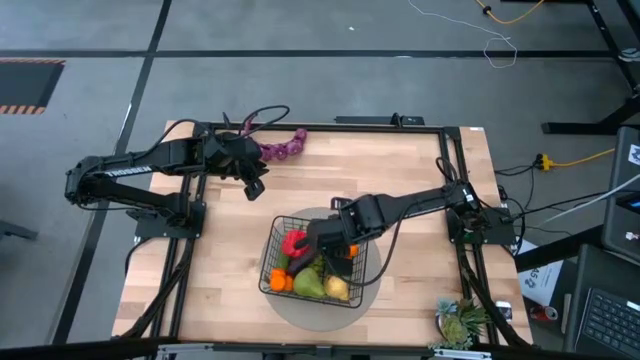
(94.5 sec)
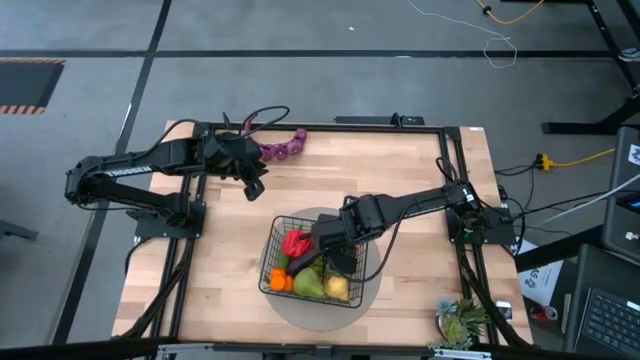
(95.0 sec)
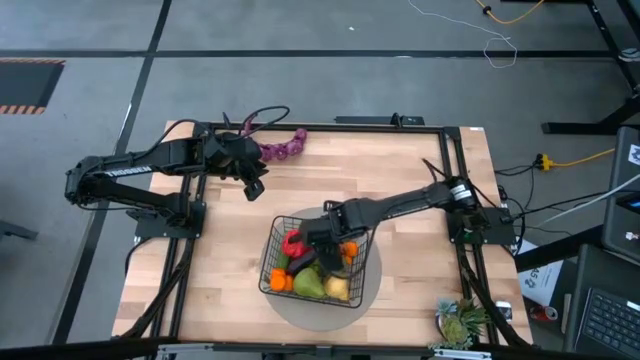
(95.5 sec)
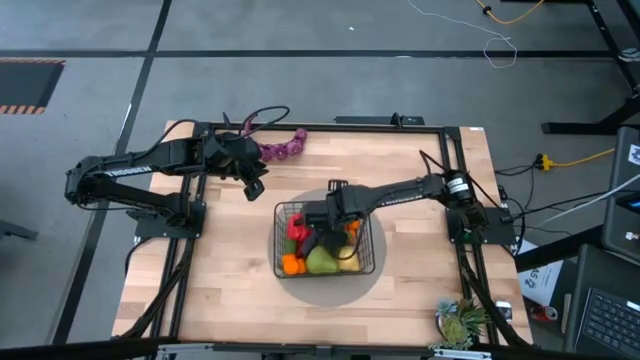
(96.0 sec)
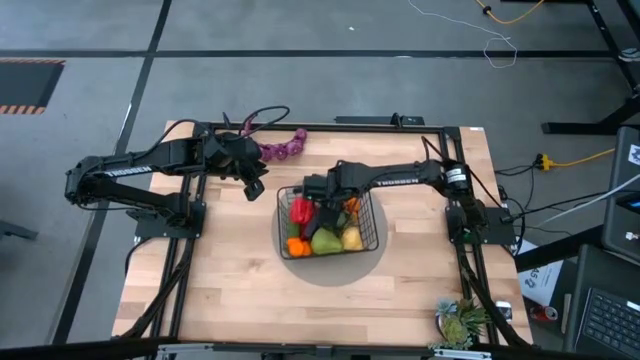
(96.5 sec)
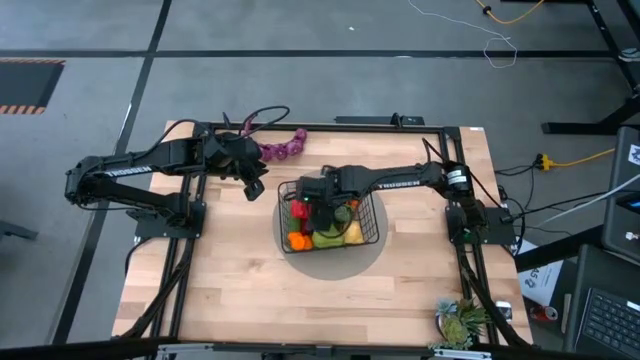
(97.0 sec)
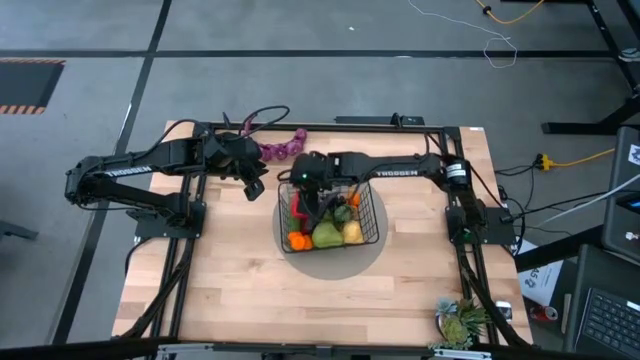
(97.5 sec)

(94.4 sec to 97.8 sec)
Task: Build produce basket
Move the black wire basket to the center of the table

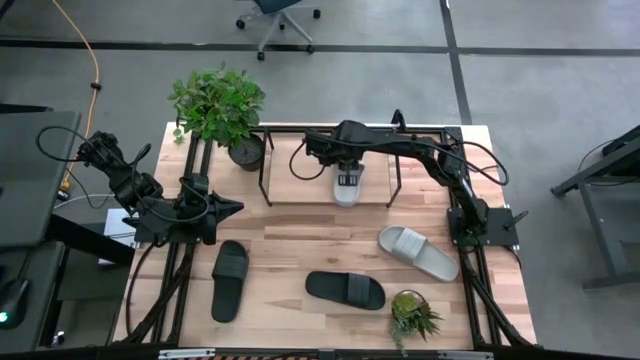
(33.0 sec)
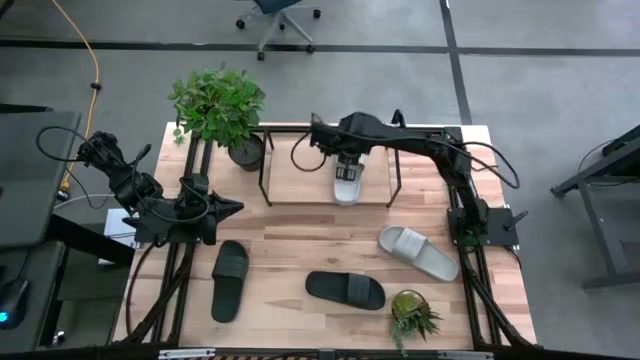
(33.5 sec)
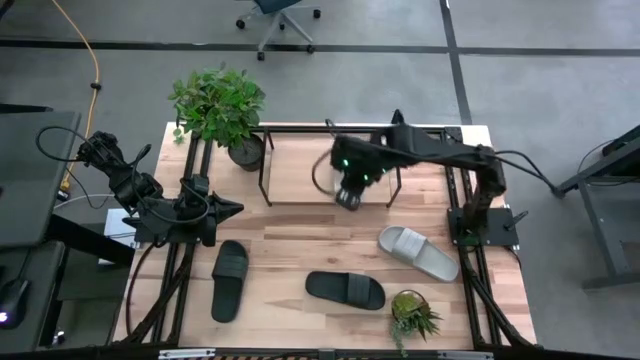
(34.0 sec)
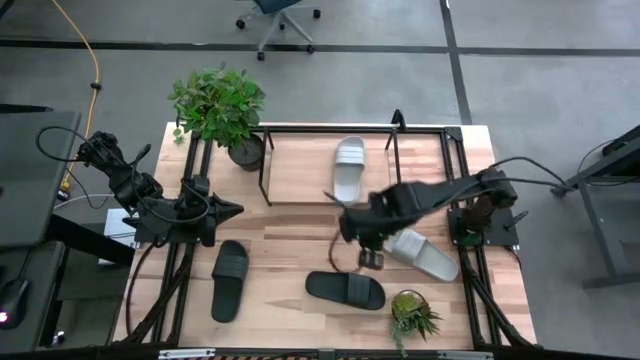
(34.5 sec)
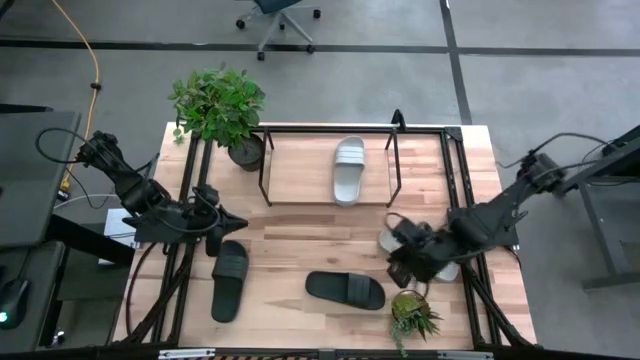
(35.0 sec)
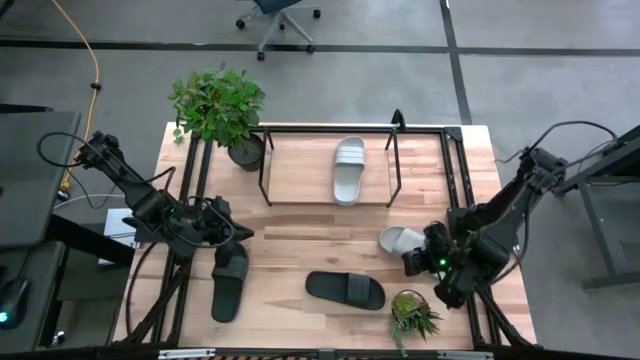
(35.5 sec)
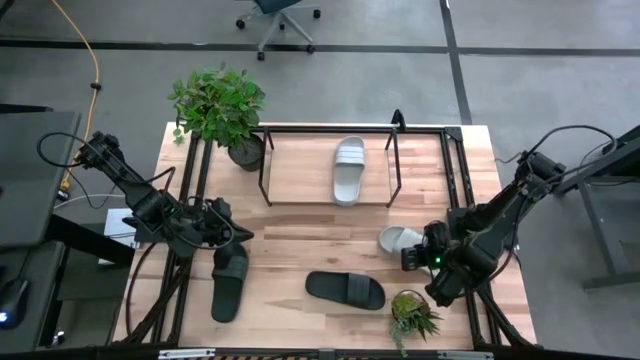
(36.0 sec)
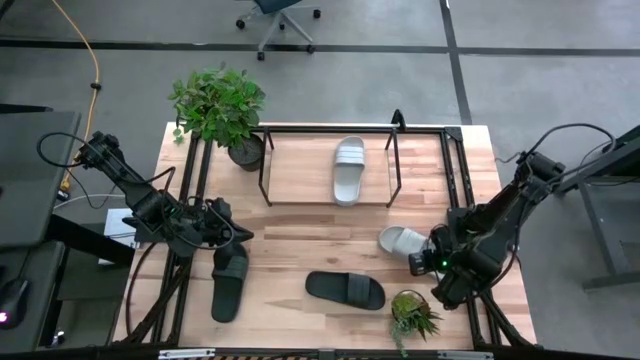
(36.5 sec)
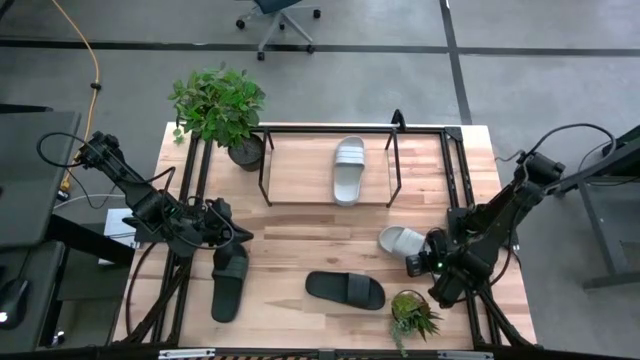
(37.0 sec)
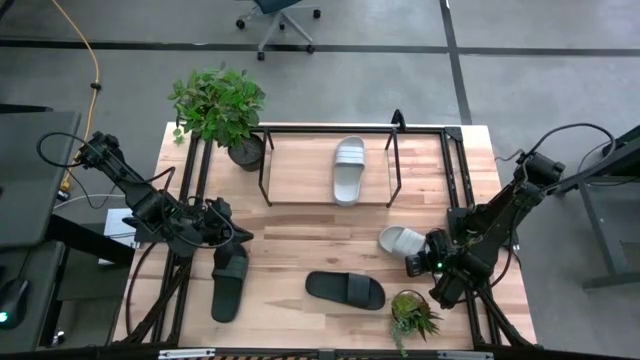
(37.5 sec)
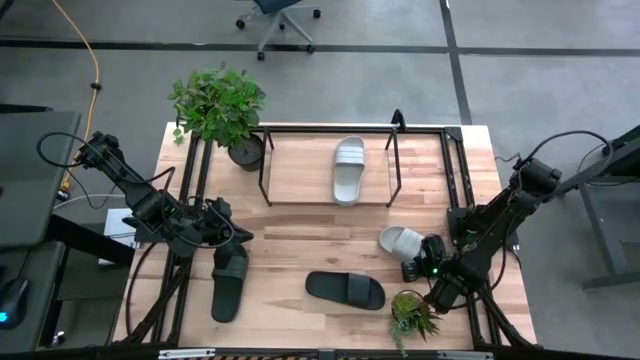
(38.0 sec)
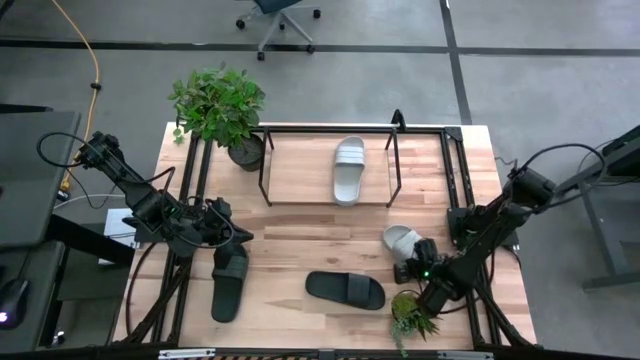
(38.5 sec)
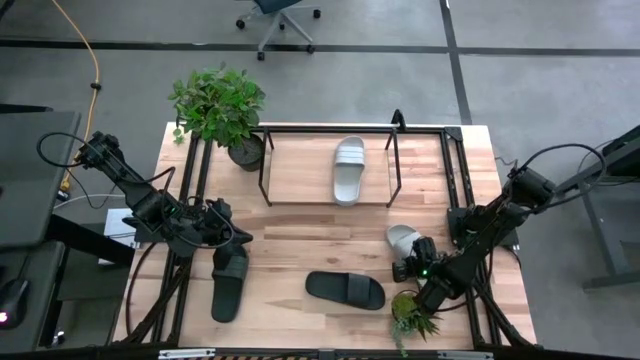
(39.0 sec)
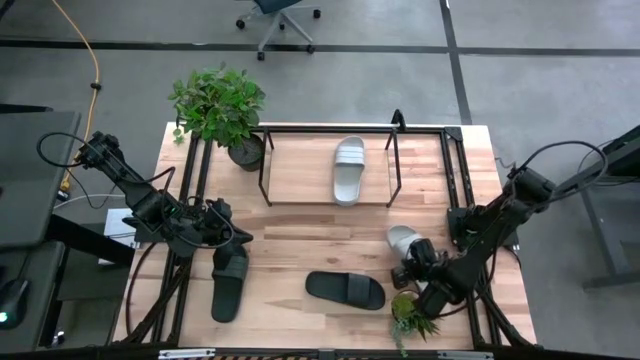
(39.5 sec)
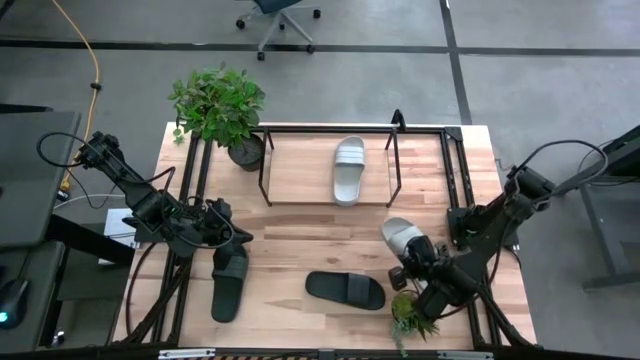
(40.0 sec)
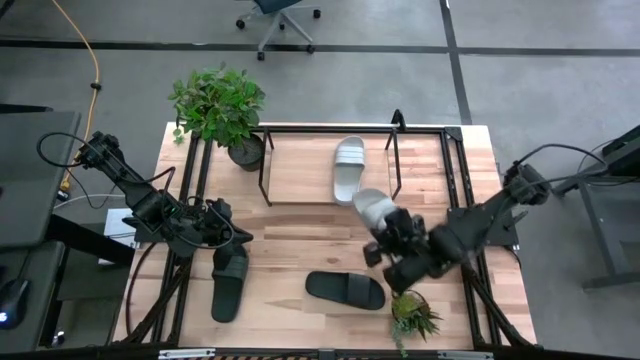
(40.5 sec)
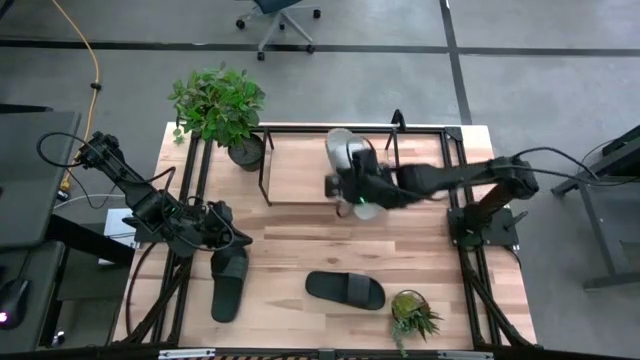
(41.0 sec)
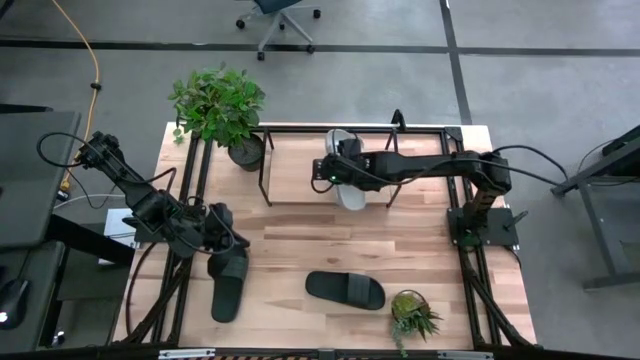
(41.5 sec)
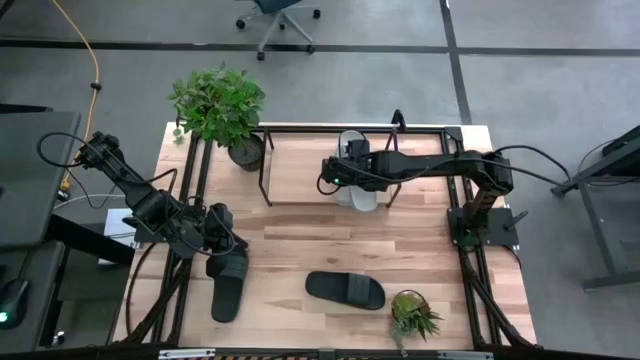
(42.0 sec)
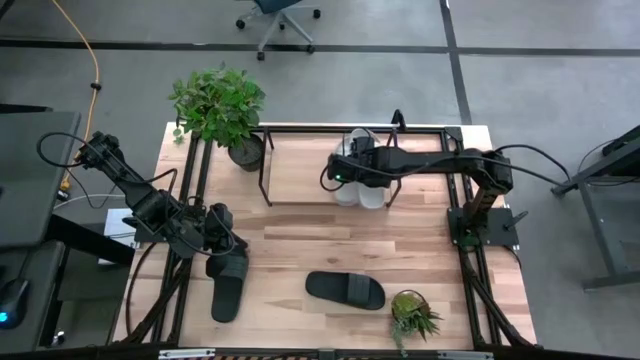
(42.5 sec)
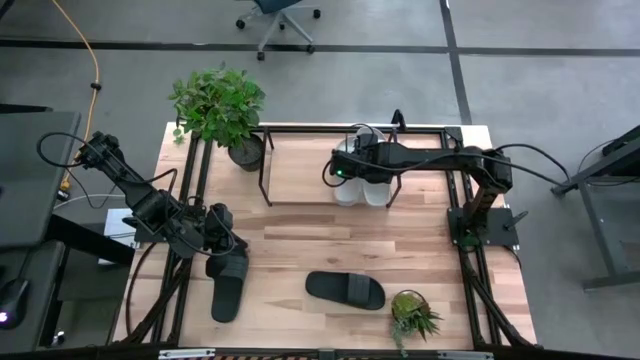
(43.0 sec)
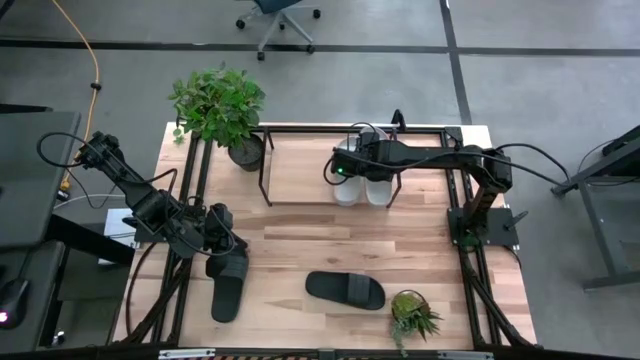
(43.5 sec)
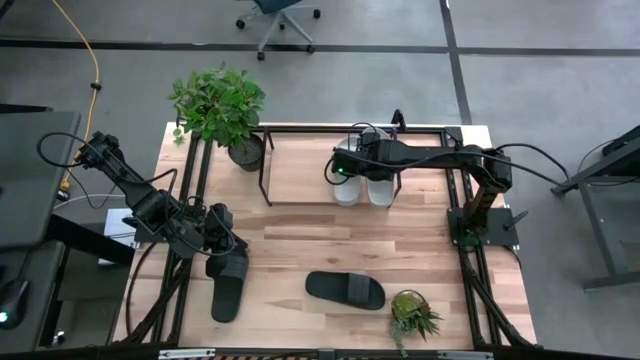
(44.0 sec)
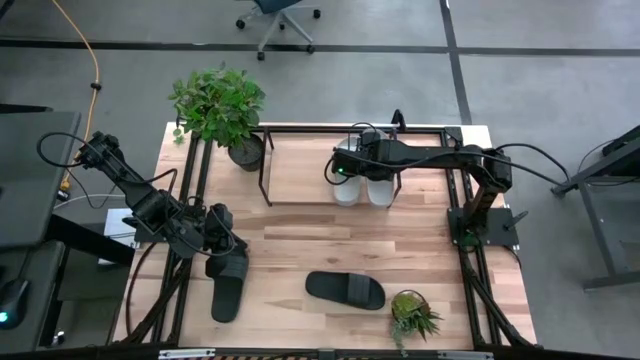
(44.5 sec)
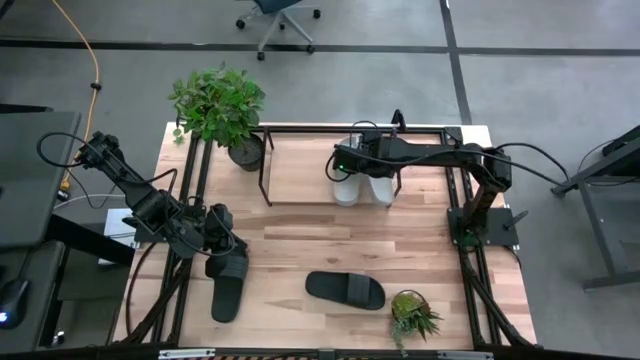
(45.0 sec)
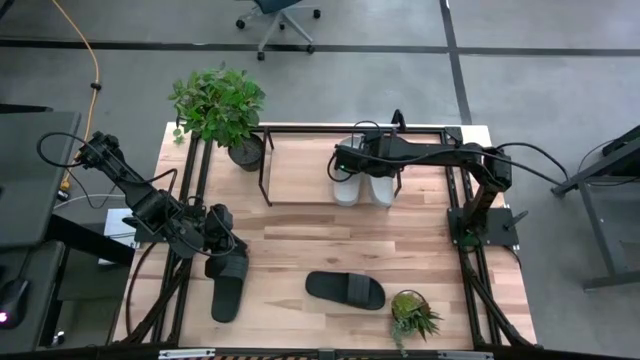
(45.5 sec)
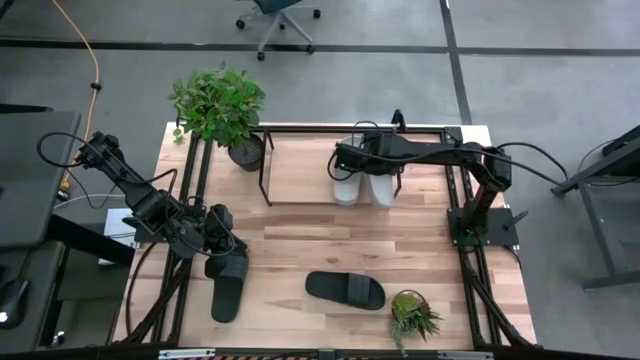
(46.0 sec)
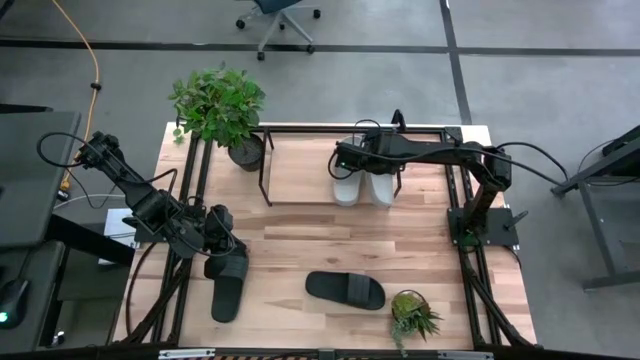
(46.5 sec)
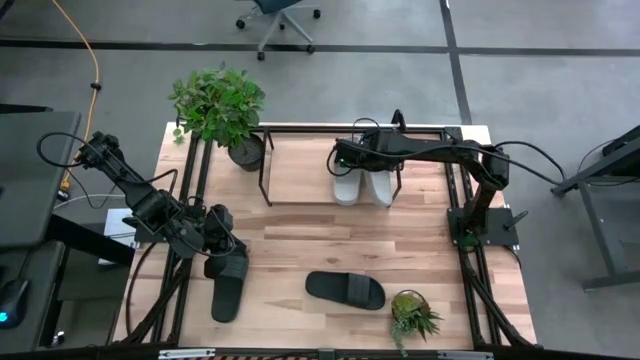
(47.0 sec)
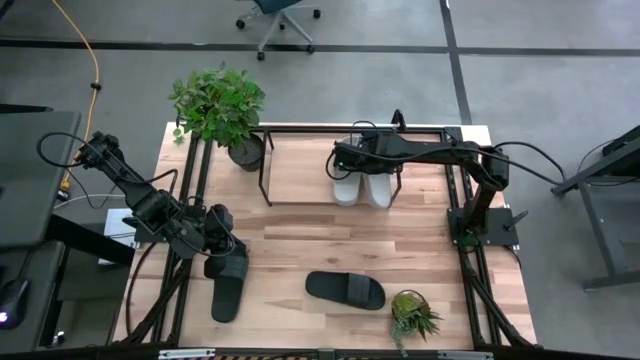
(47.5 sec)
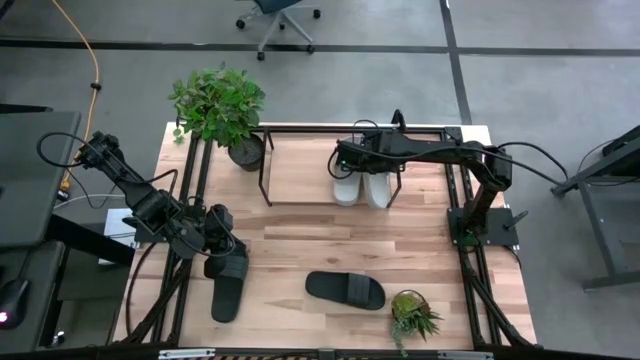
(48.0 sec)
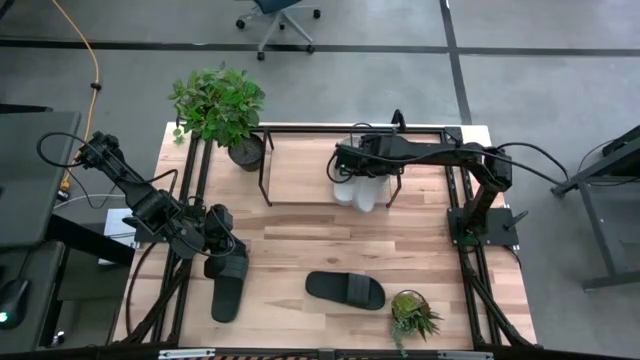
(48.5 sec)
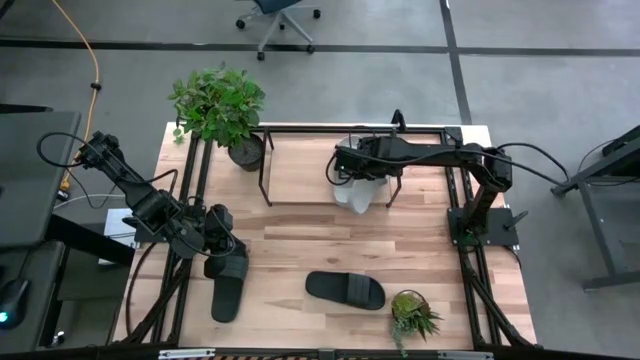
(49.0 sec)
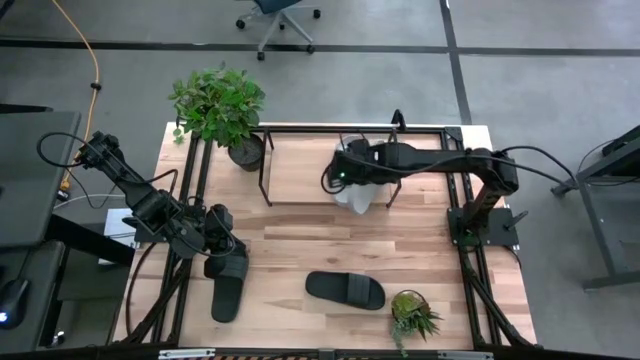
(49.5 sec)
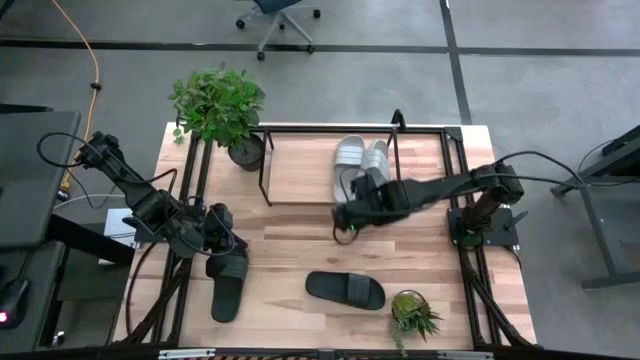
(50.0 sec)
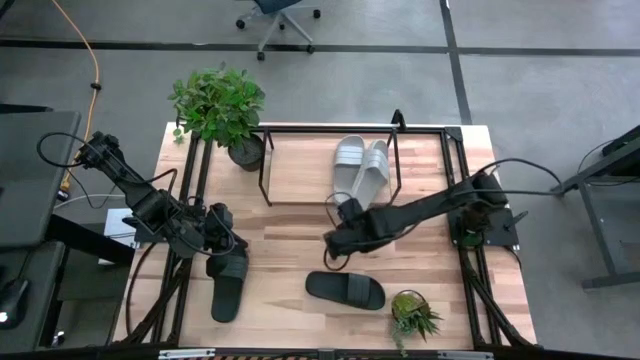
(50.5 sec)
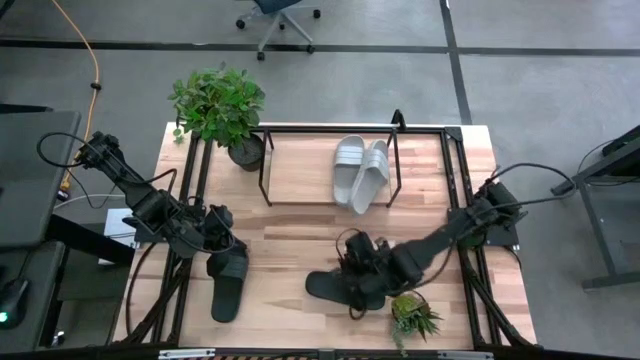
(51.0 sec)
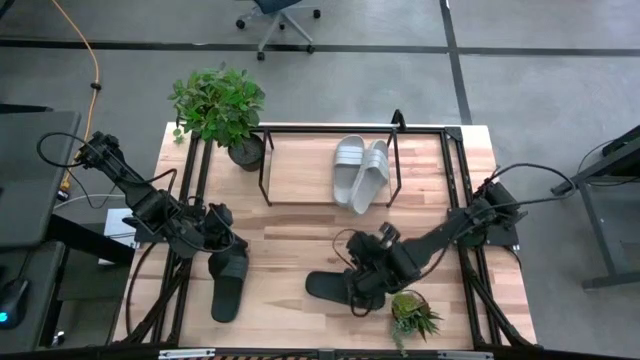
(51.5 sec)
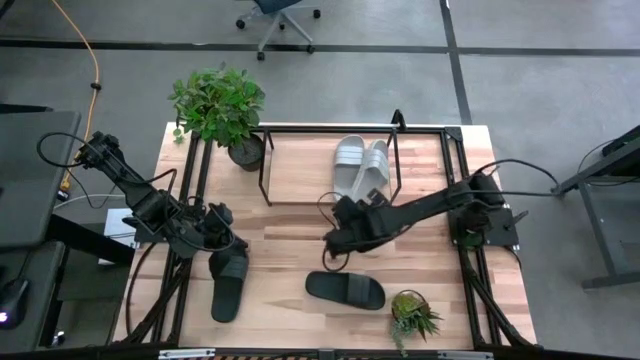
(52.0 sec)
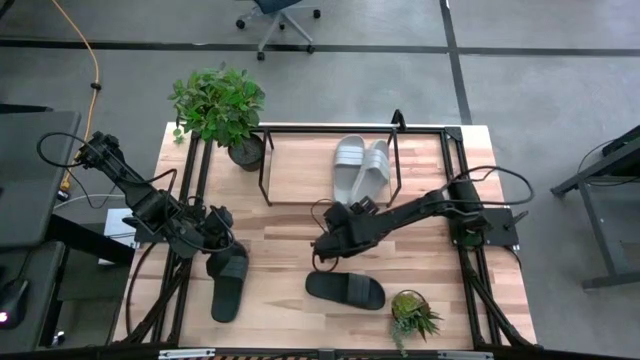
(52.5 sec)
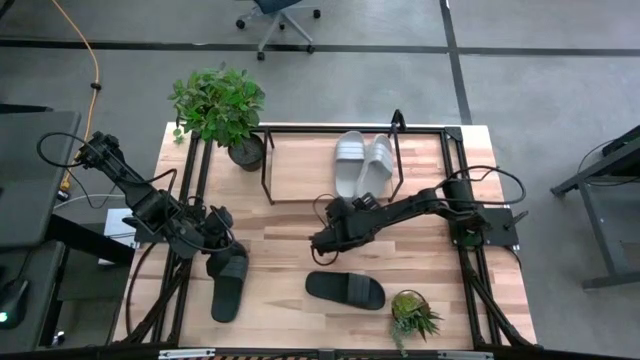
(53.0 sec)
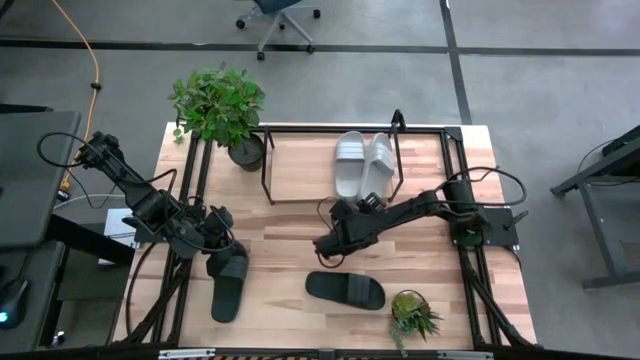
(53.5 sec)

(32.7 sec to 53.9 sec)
Task: Pick and place slides into the shelf
Put the gray slipper on the shelf
